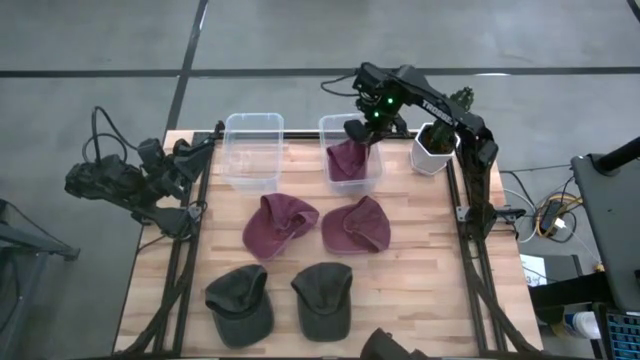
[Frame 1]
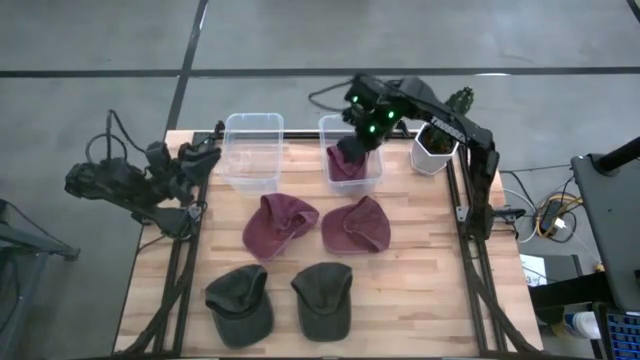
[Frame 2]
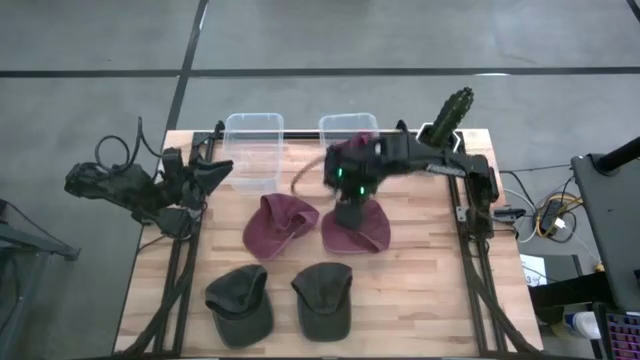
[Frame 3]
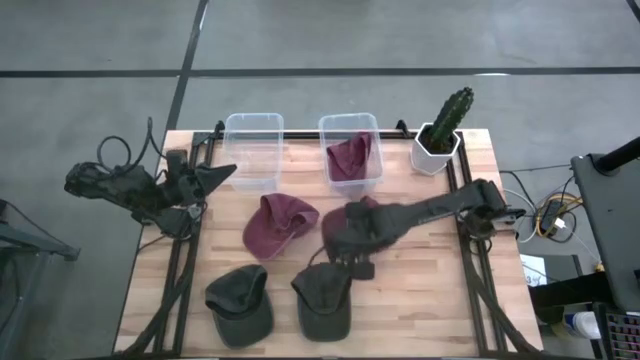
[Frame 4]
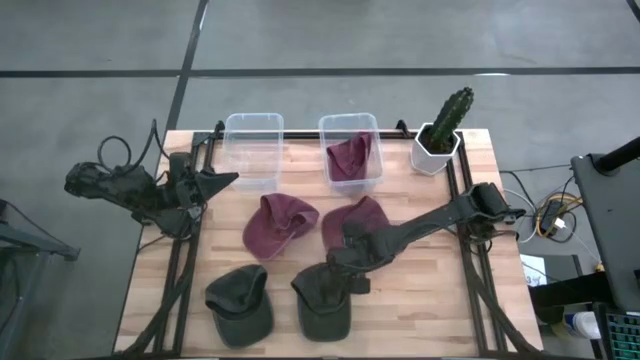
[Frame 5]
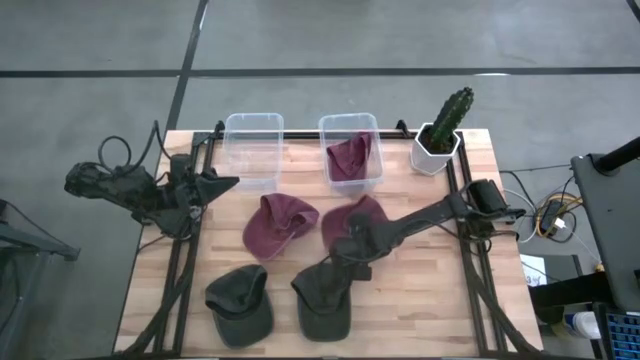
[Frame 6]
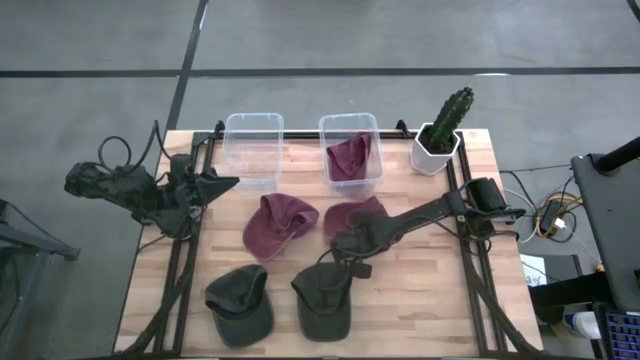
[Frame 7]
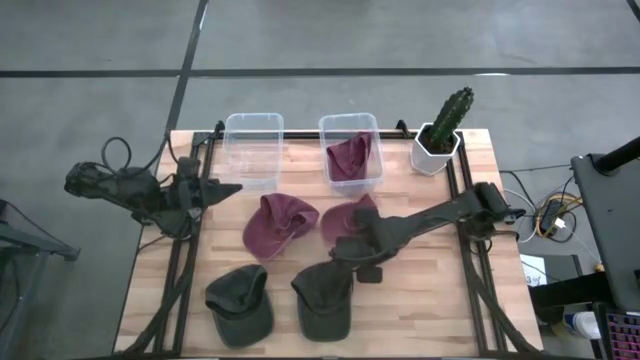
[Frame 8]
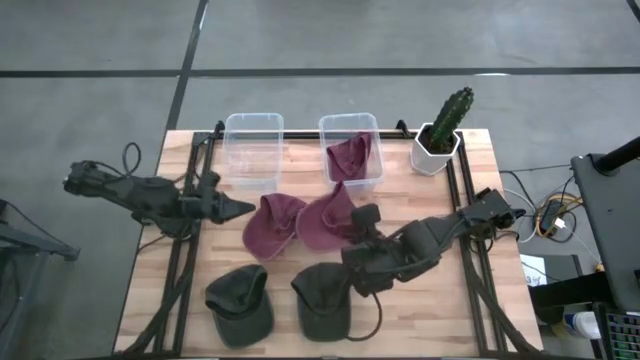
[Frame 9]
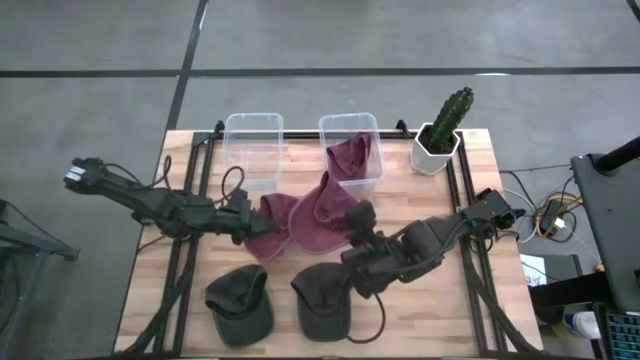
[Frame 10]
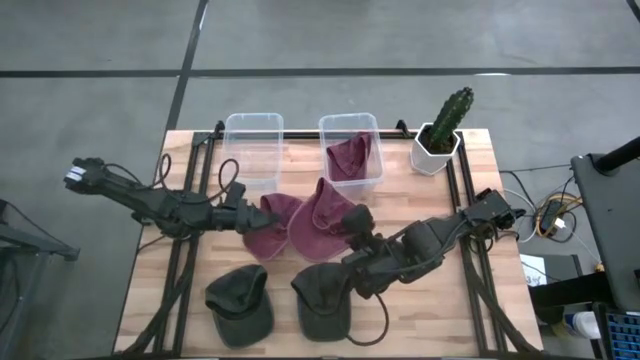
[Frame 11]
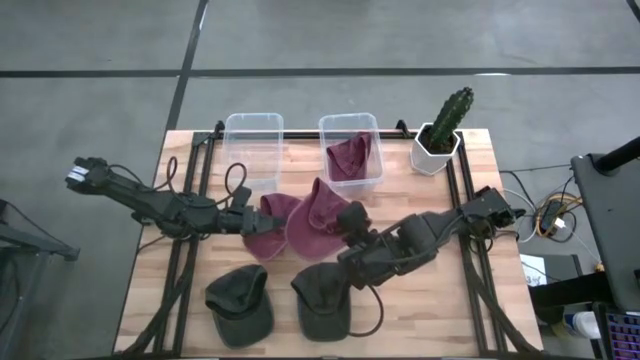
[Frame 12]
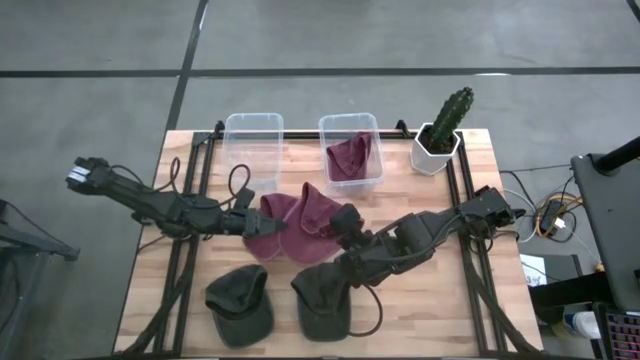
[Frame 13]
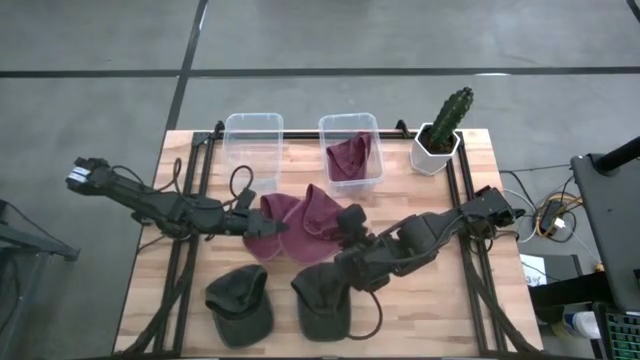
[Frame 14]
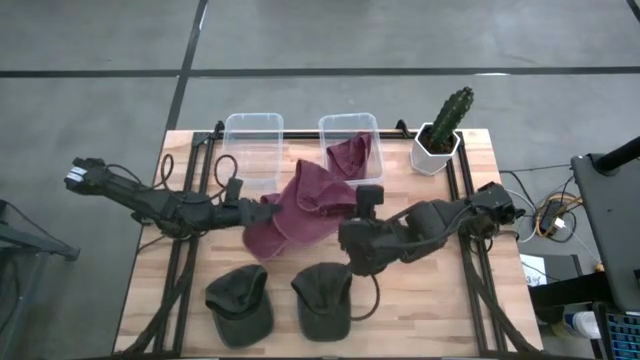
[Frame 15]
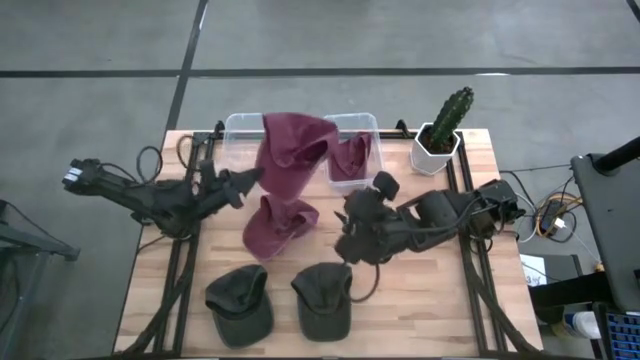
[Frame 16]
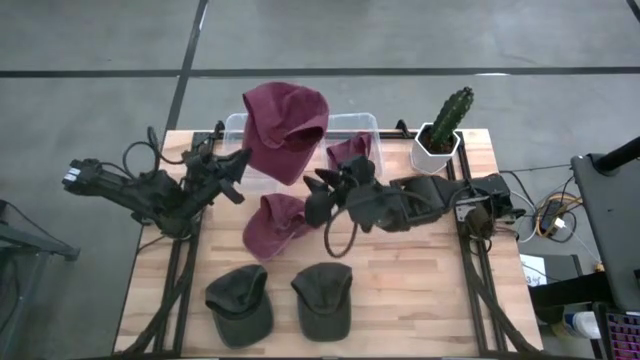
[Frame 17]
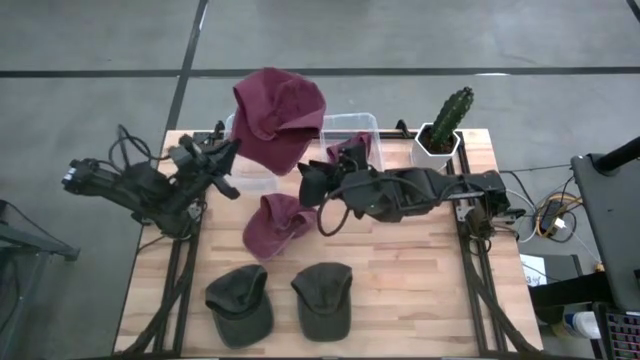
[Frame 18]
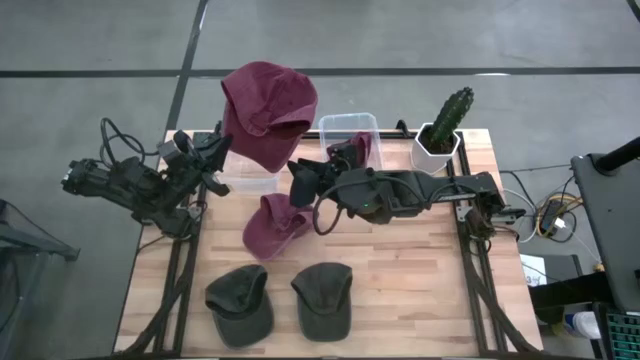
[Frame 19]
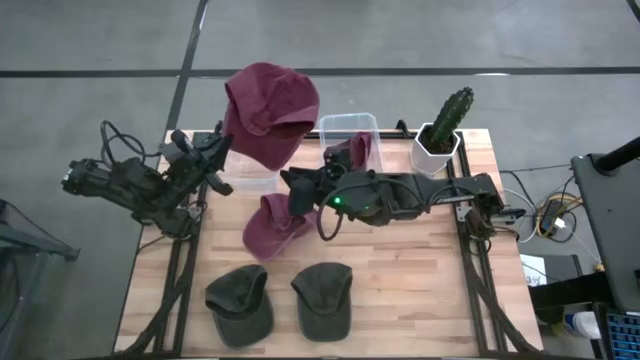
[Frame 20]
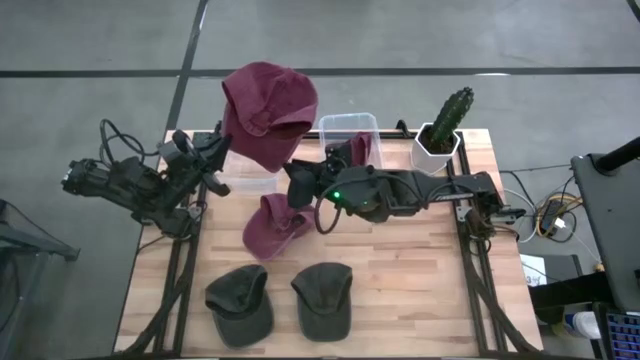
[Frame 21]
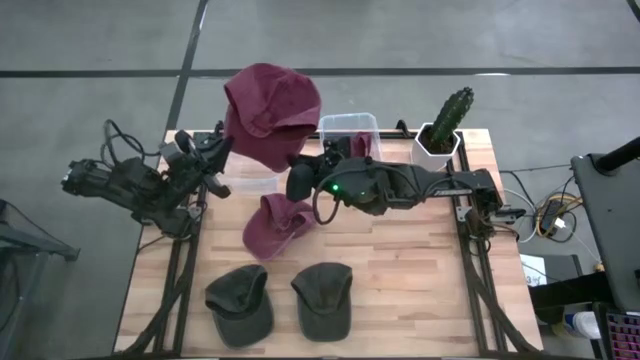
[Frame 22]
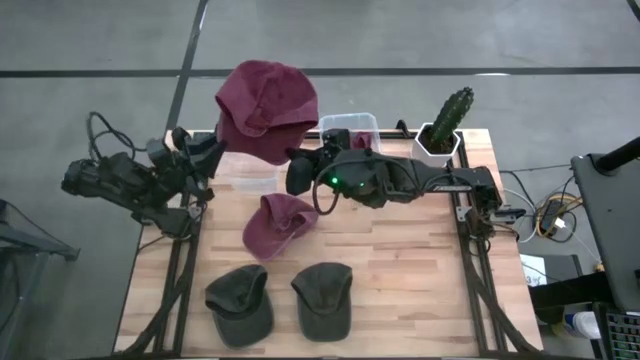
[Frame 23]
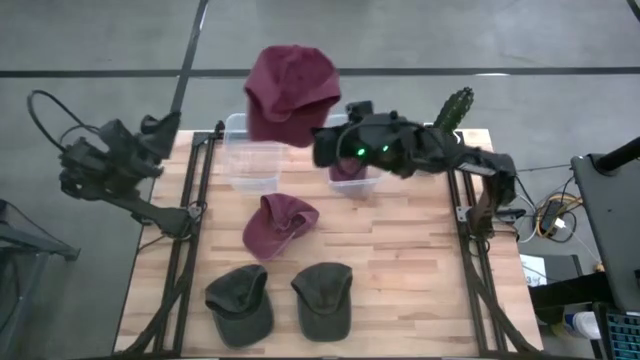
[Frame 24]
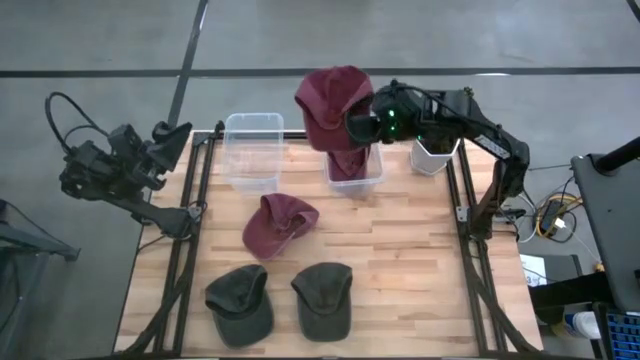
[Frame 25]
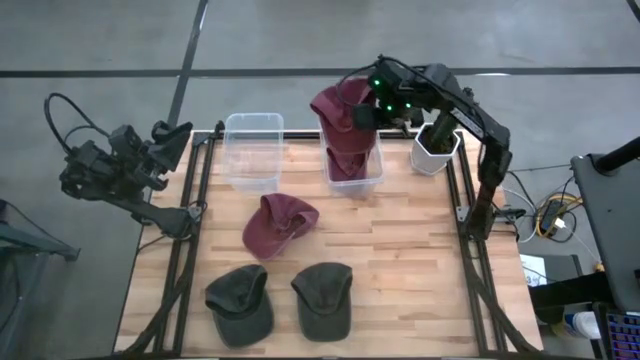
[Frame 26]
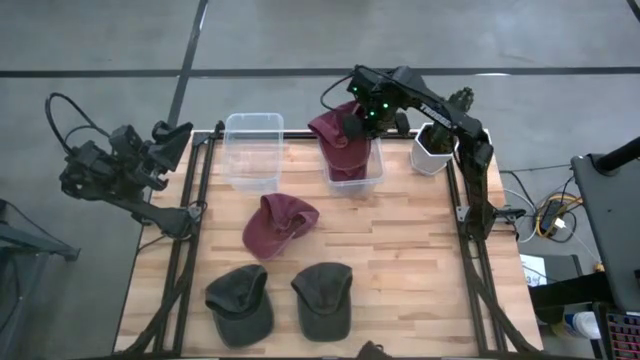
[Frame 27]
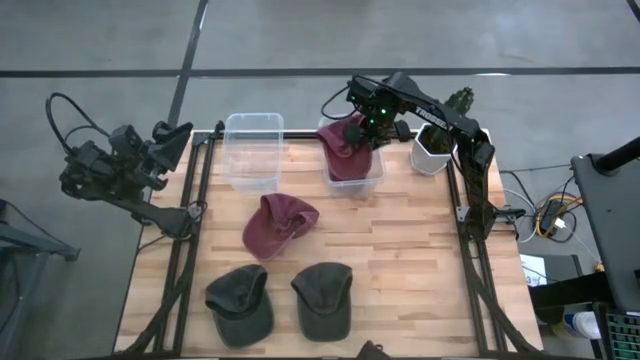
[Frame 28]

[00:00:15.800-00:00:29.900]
Task: Pick & Place hat
Put the right red cap into the right transparent bin

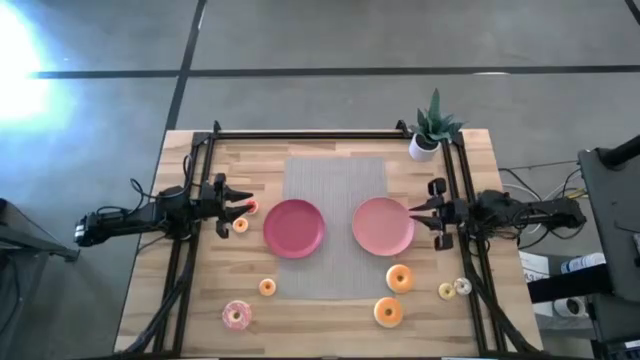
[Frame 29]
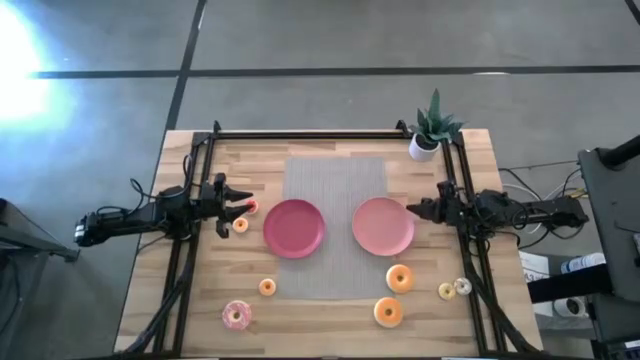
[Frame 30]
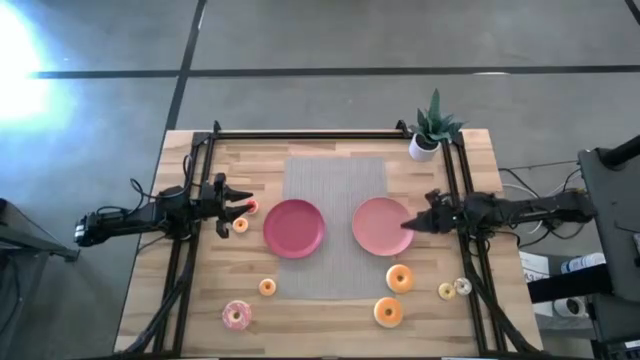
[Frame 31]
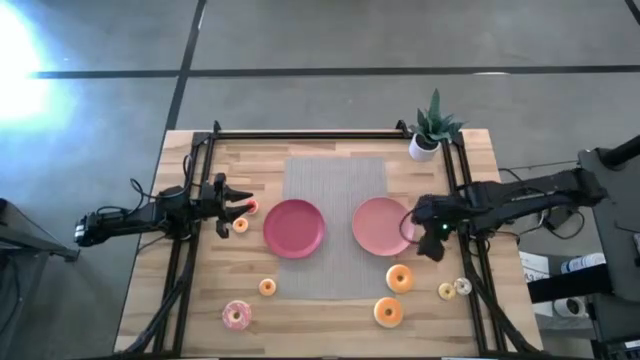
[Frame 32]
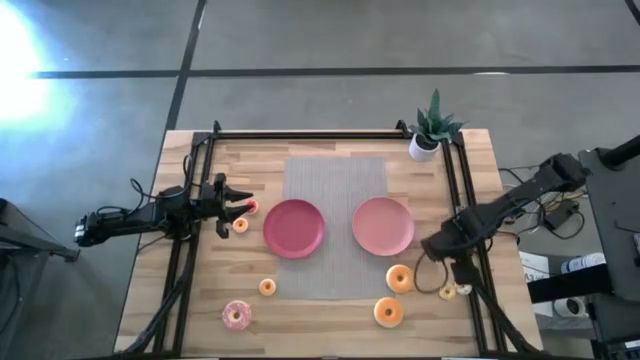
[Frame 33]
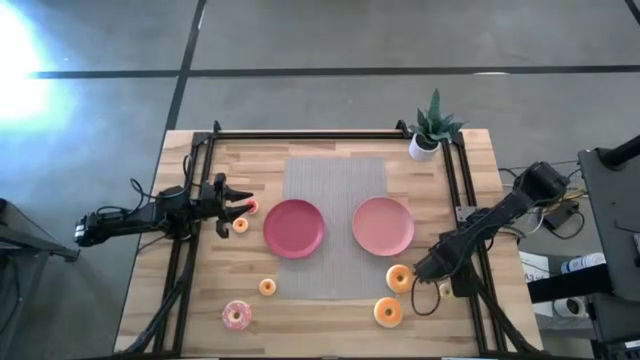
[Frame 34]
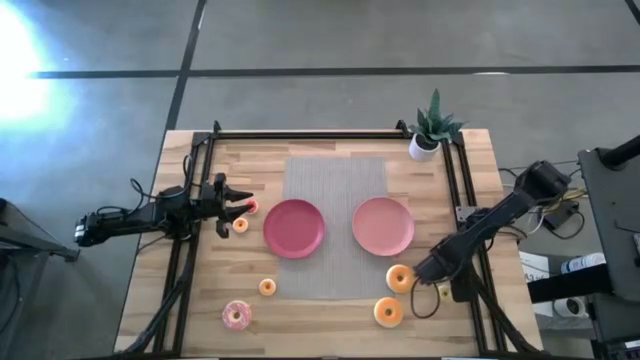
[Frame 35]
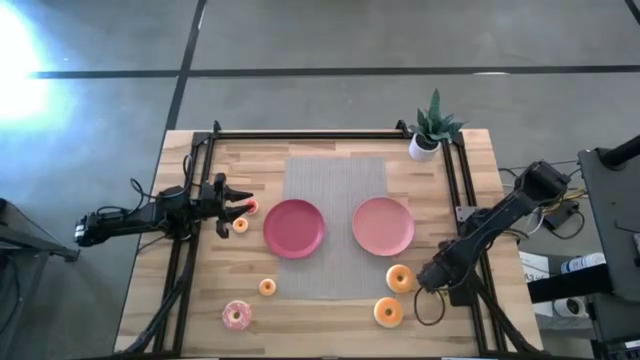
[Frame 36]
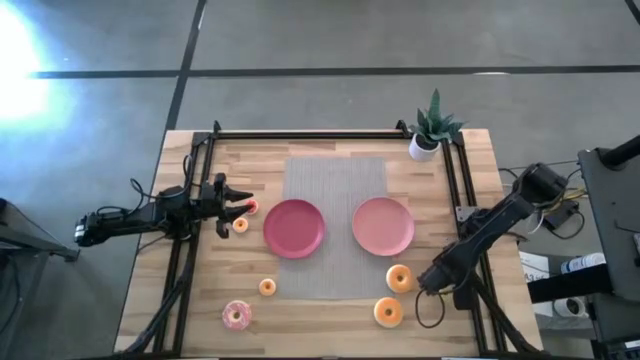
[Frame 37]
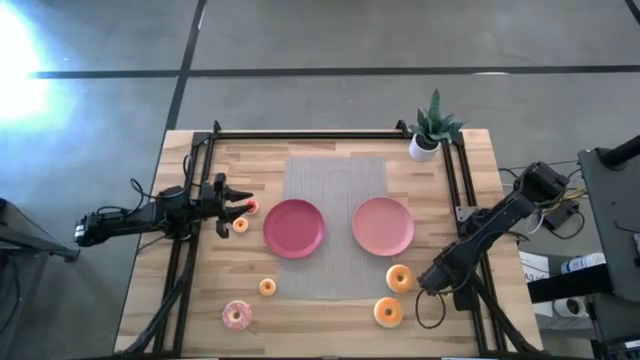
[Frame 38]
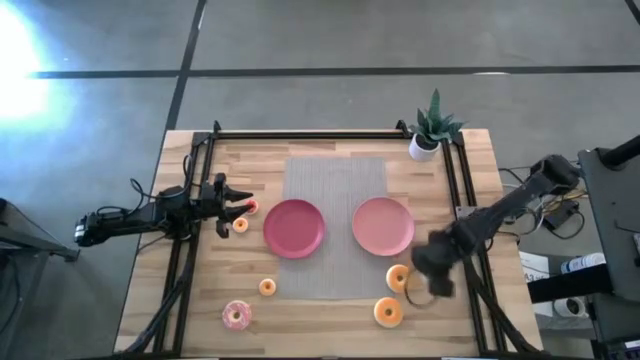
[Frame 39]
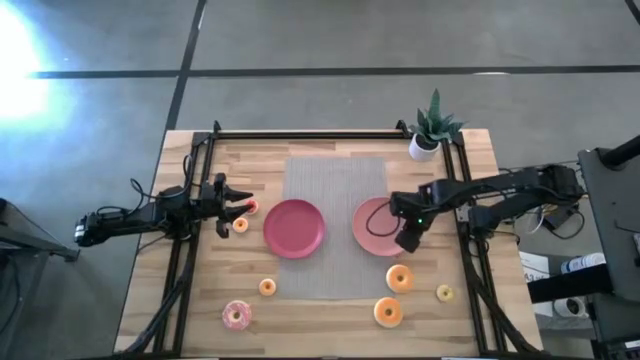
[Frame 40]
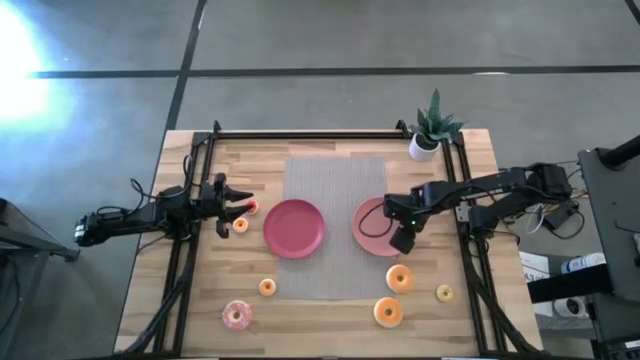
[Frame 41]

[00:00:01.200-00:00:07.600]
Task: Pick & Place donuts
Put the small white donut on the light pink plate

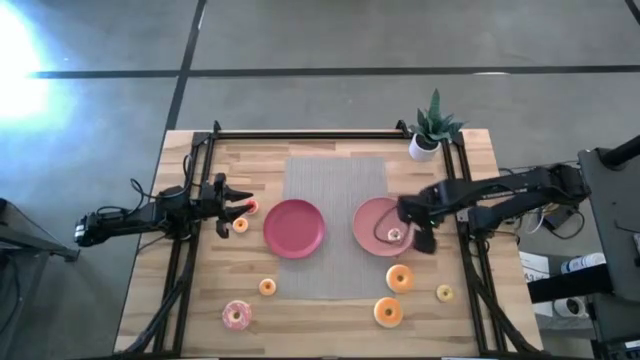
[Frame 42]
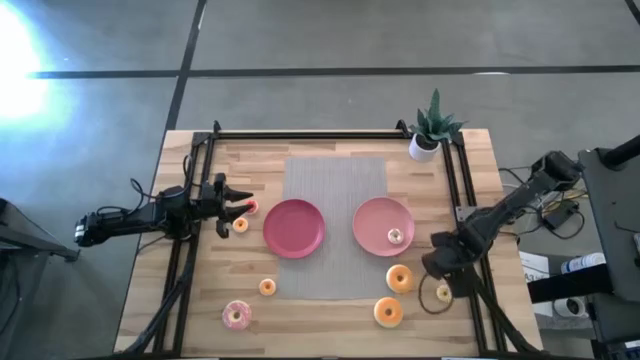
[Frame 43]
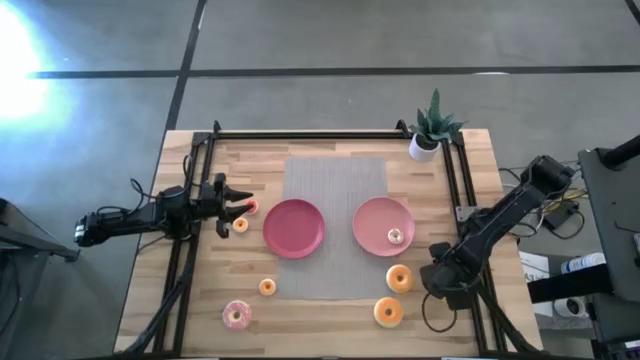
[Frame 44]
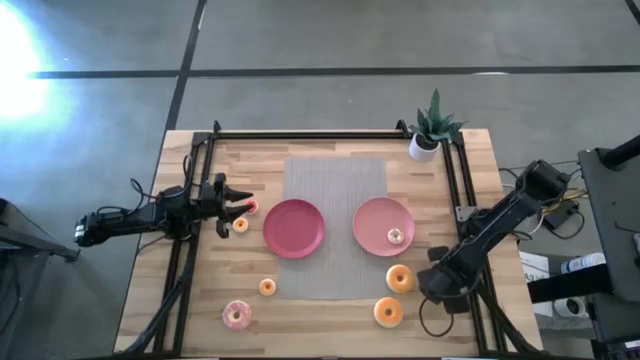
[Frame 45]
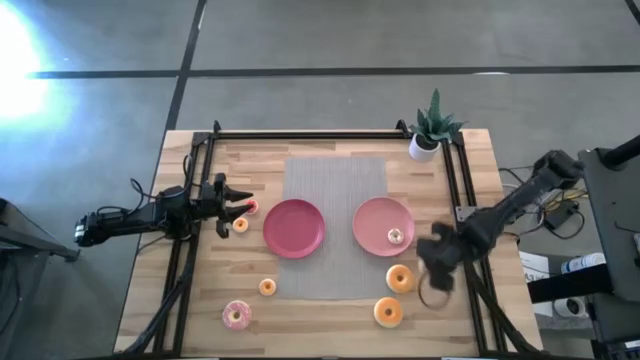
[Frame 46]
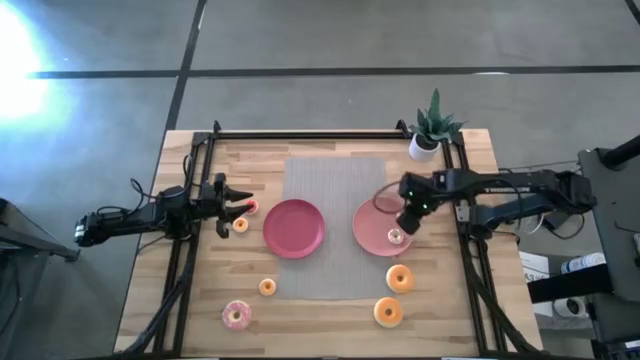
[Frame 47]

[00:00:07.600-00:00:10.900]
Put the small yellow donut on the light pink plate
